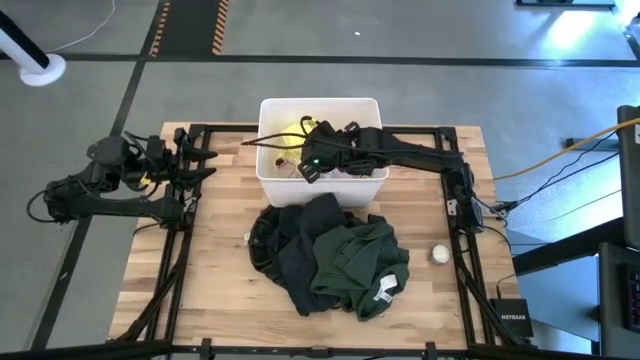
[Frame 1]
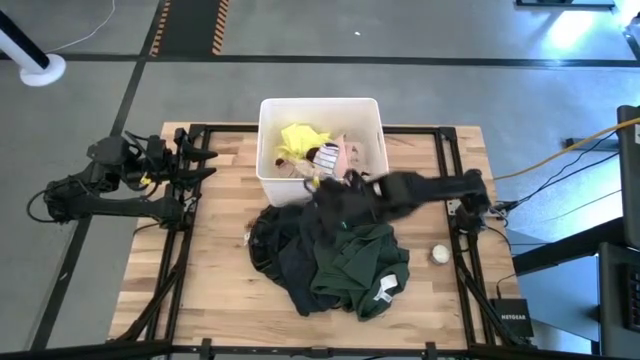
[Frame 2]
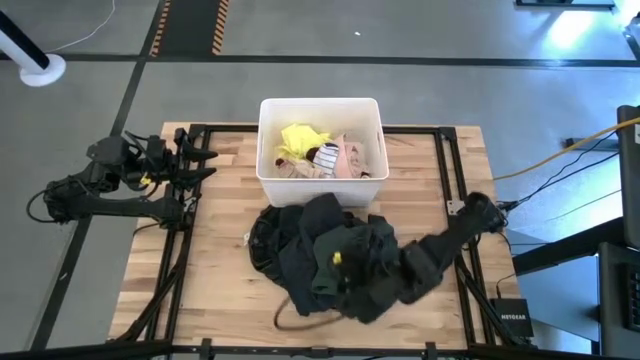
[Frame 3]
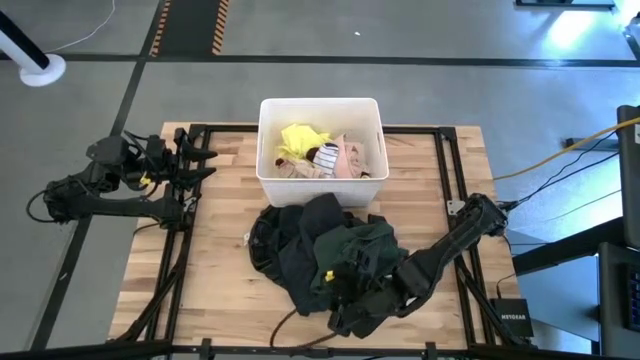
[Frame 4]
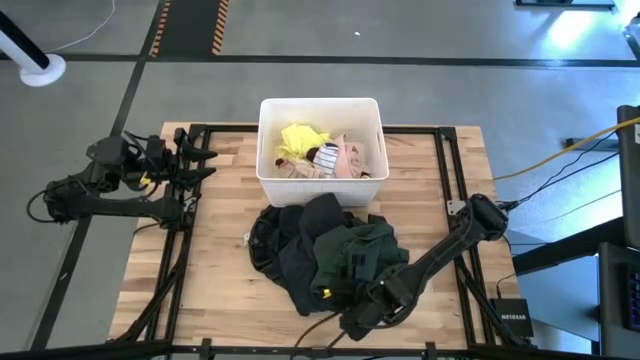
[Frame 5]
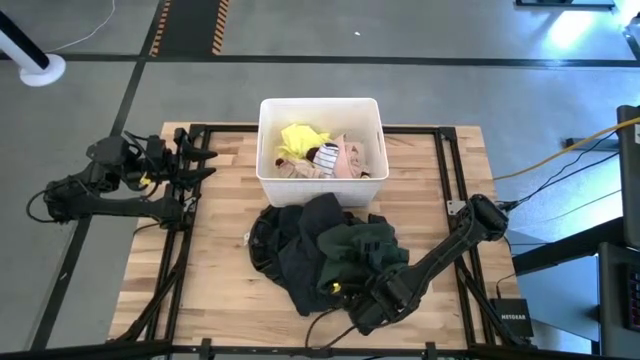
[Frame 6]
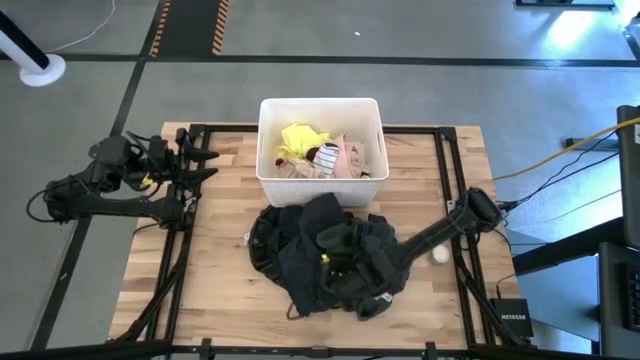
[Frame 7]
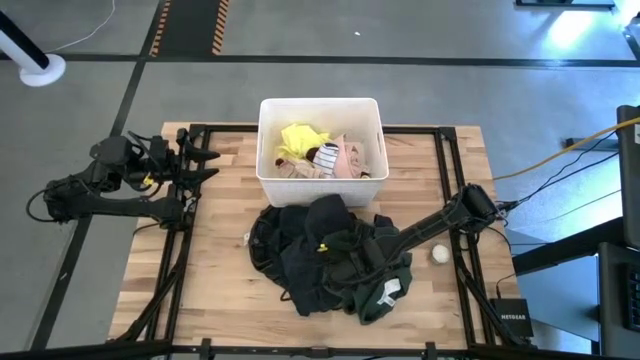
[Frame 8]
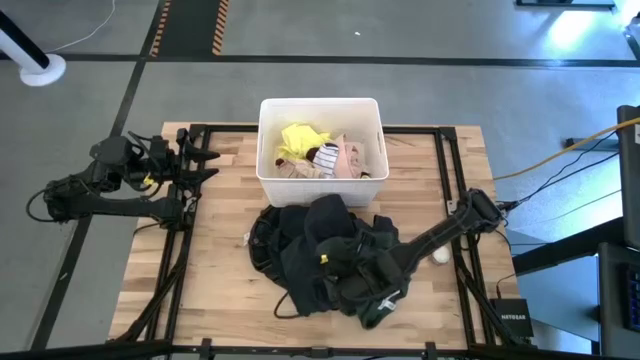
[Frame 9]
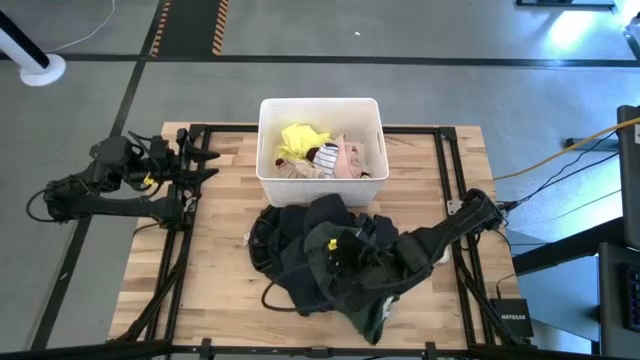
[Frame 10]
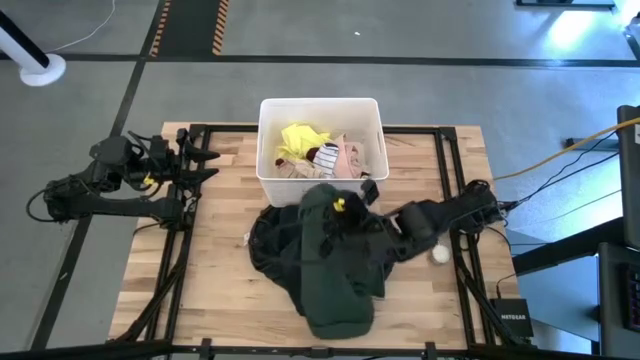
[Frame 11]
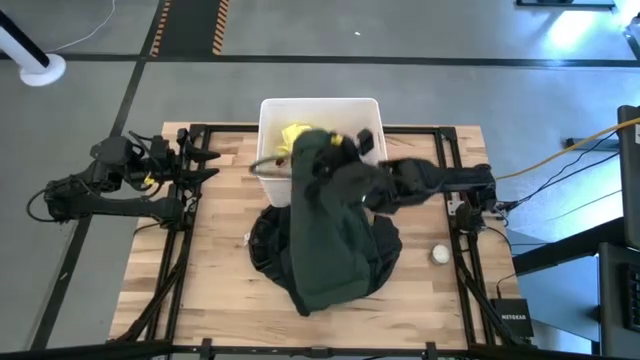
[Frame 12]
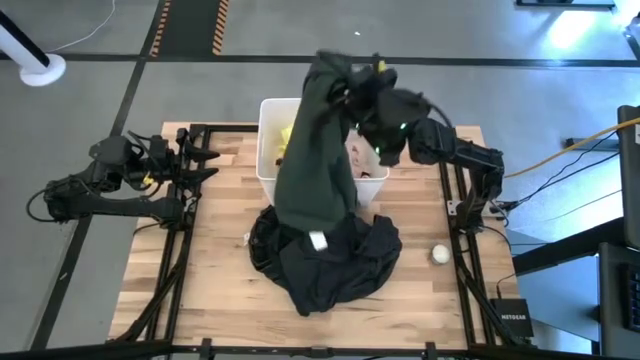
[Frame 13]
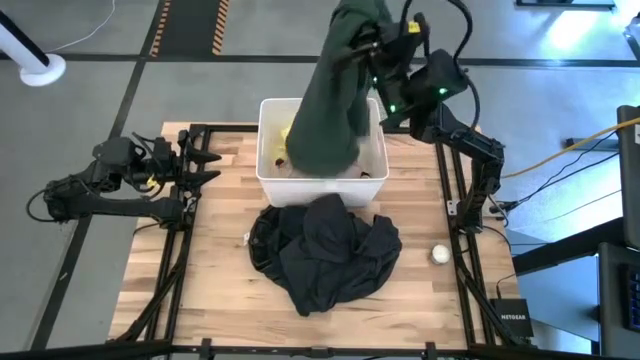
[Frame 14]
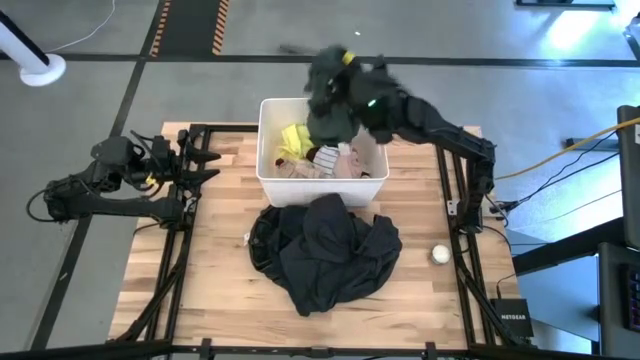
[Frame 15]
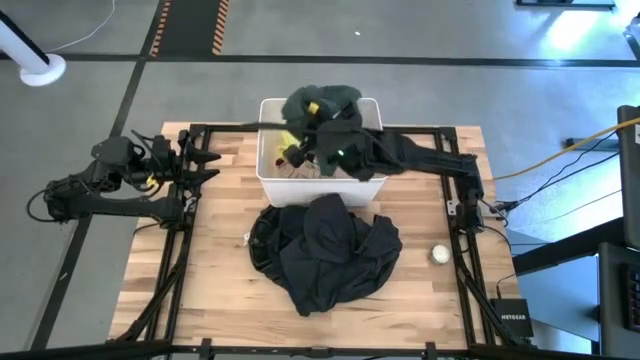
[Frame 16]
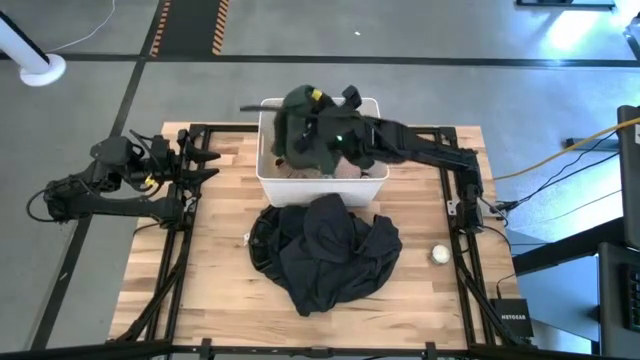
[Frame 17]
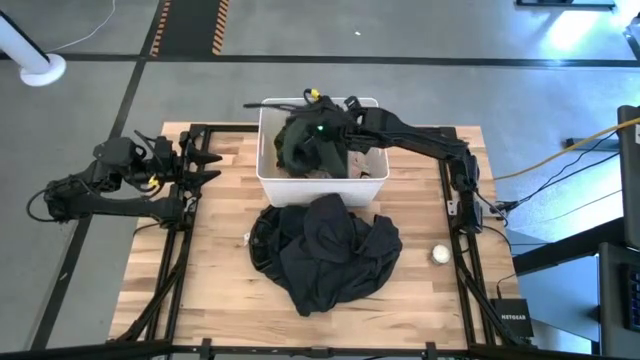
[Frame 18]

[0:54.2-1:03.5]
Task: Sort clothes
Put the dark green shirt into the white bin

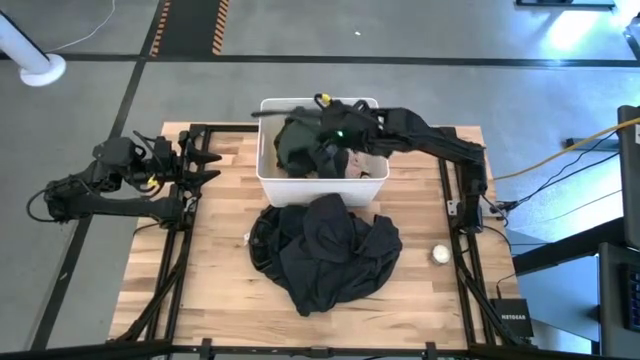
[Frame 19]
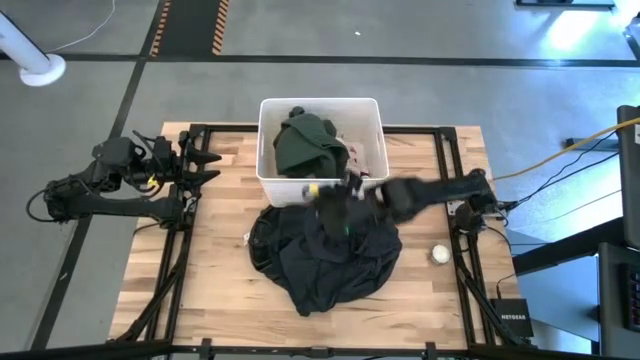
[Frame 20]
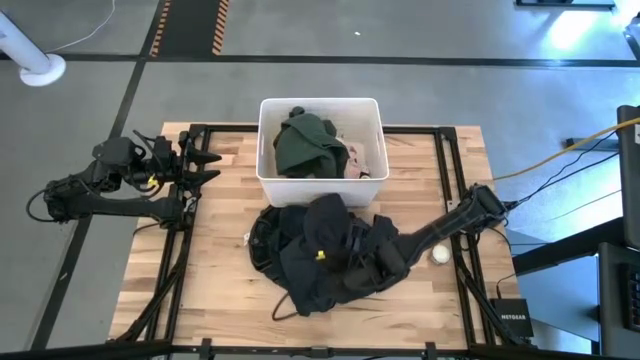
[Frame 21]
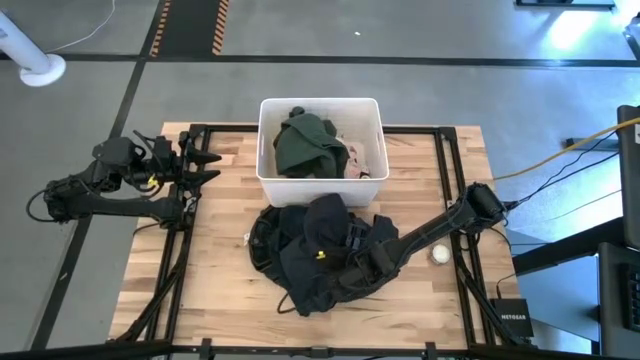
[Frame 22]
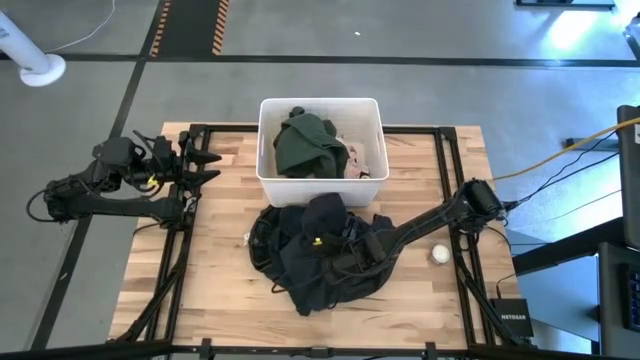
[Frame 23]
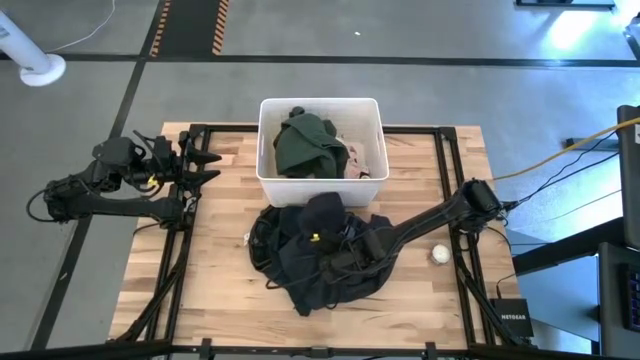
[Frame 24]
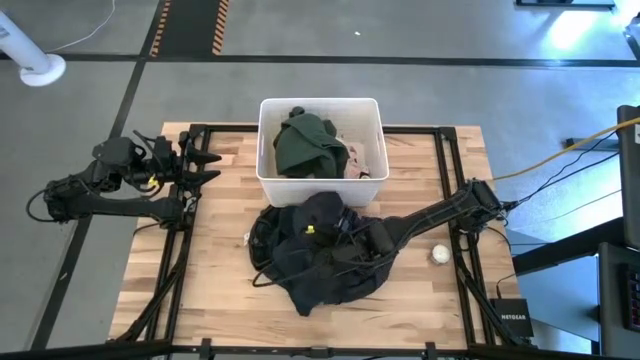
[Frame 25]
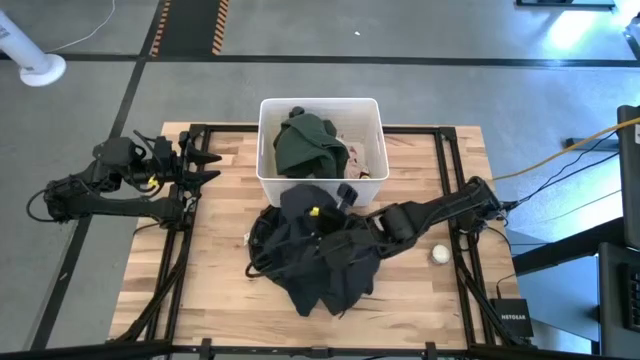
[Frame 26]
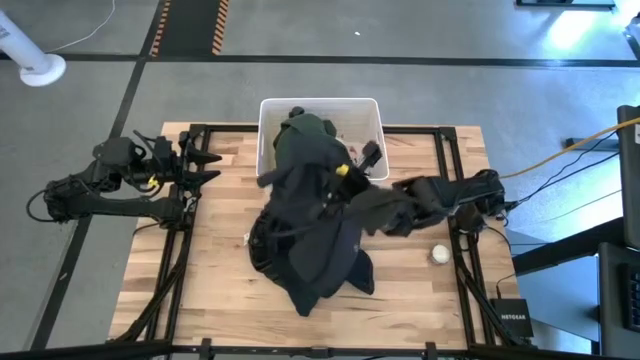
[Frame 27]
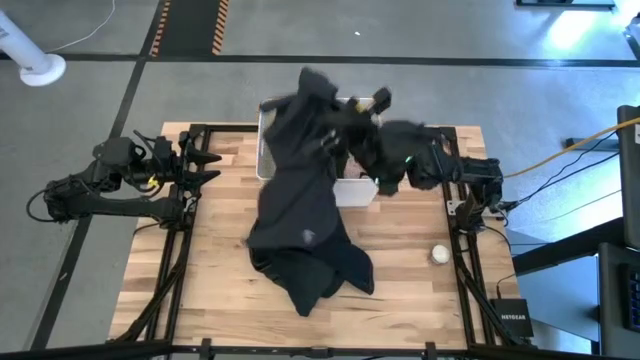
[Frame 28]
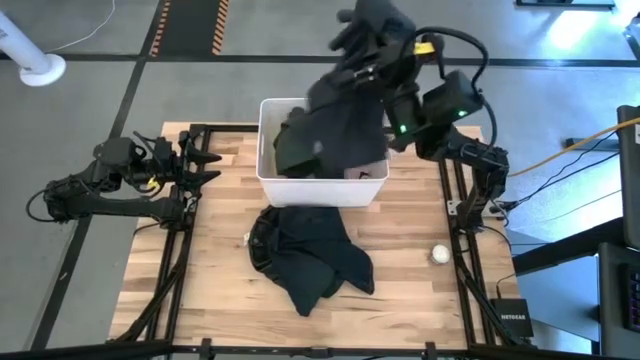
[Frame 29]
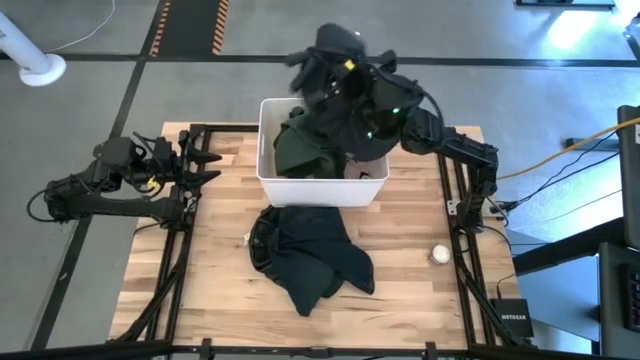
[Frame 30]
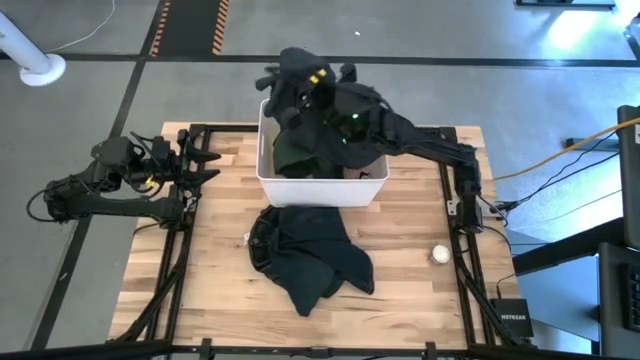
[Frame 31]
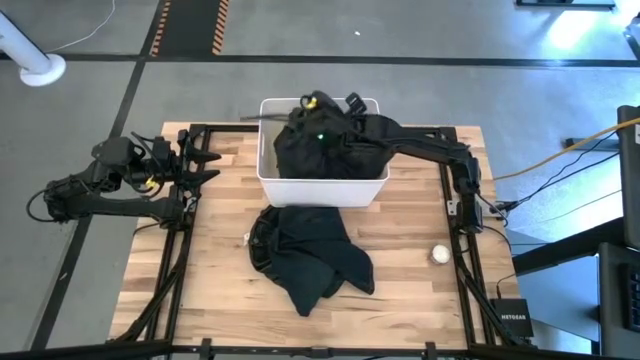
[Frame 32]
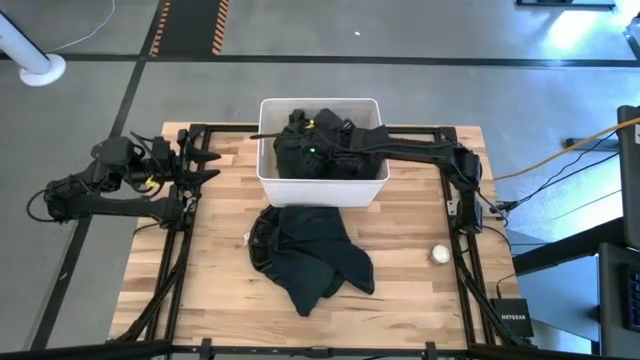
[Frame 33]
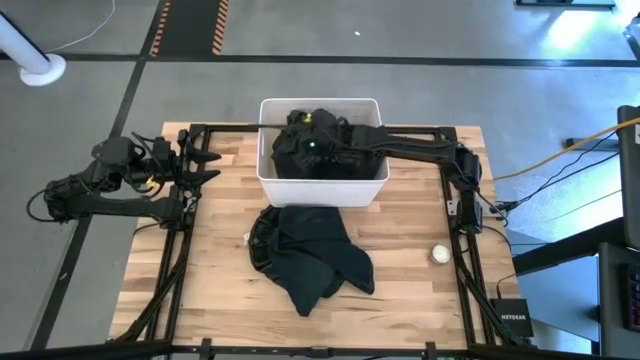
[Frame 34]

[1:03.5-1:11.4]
Put the black shorts into the white bin

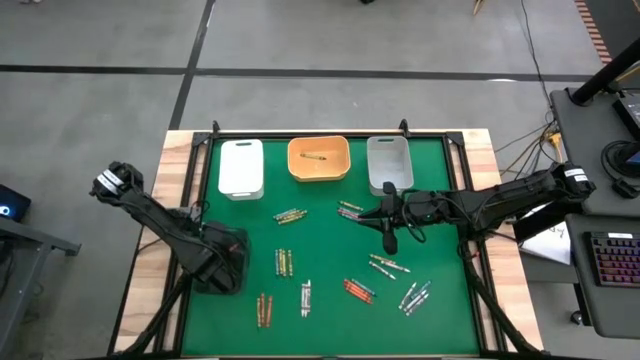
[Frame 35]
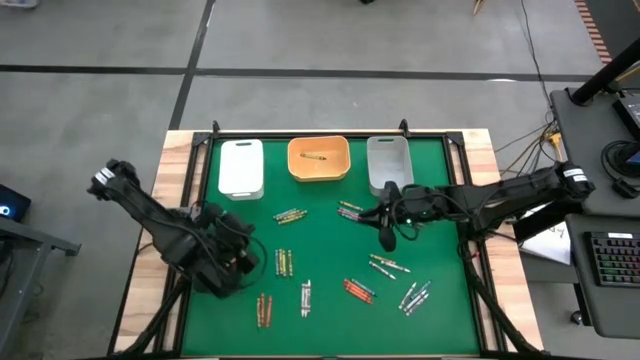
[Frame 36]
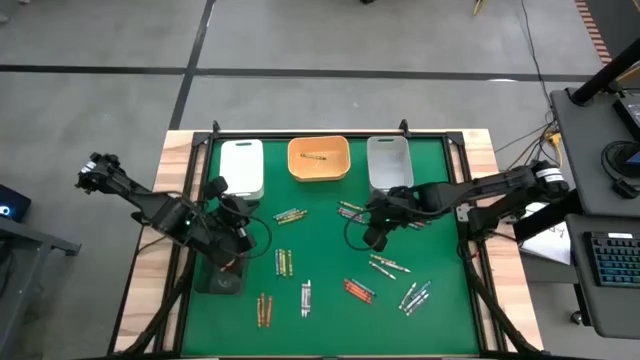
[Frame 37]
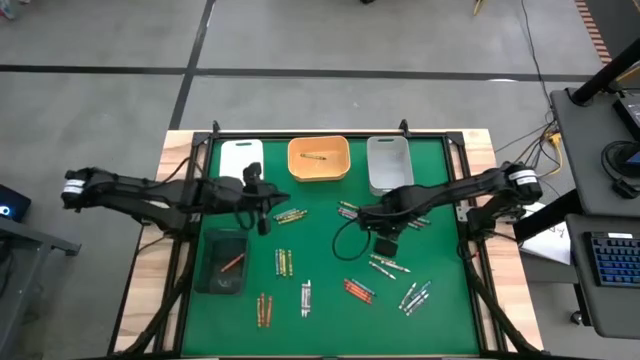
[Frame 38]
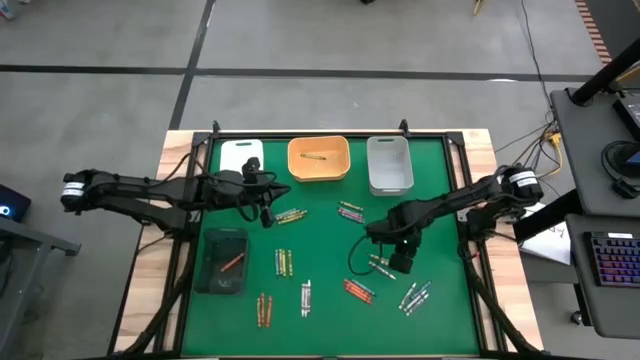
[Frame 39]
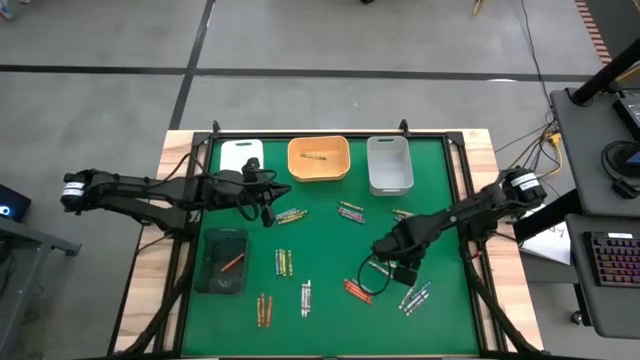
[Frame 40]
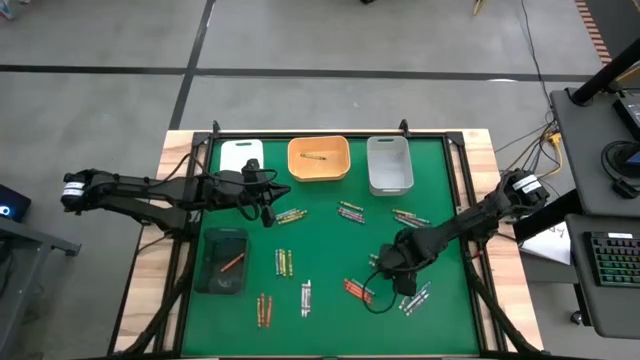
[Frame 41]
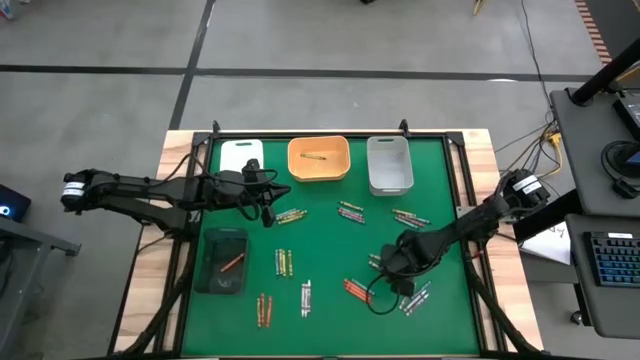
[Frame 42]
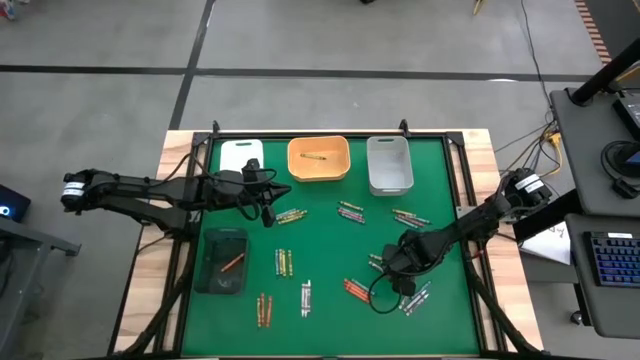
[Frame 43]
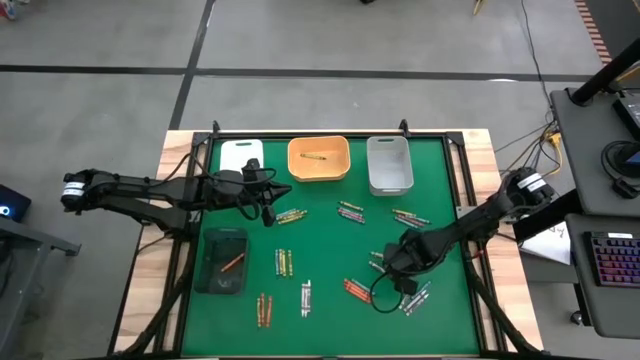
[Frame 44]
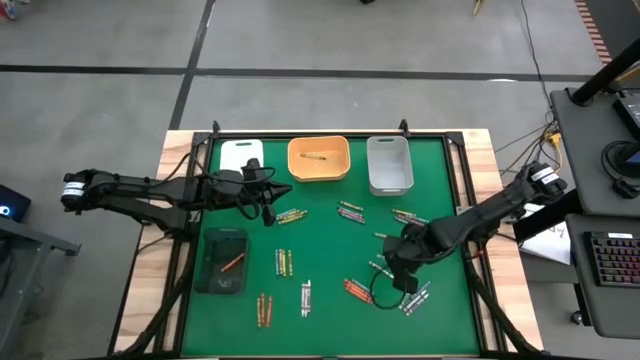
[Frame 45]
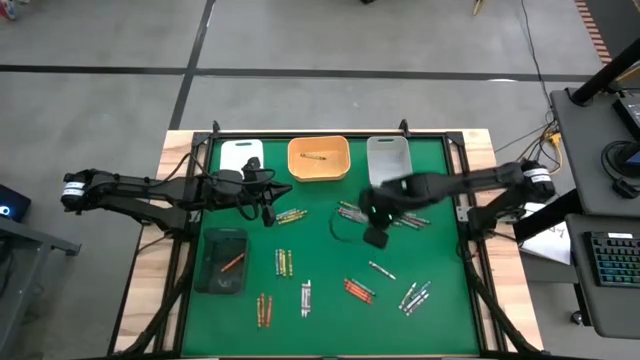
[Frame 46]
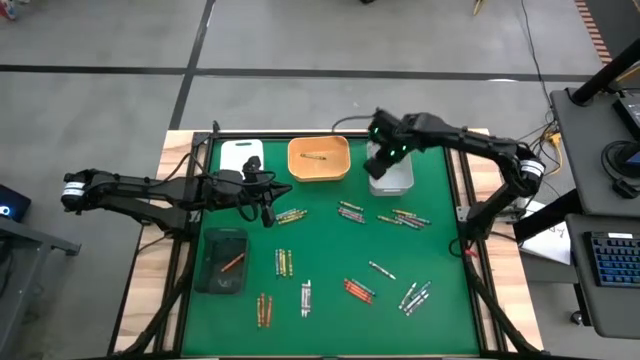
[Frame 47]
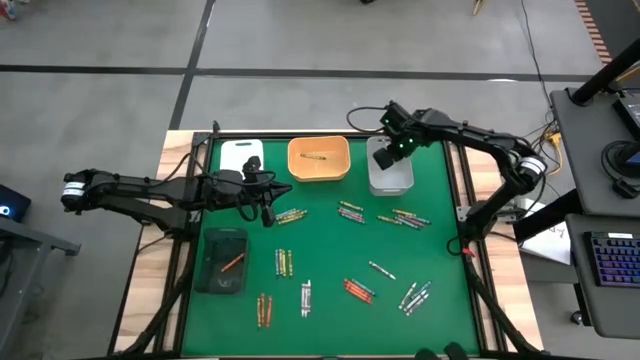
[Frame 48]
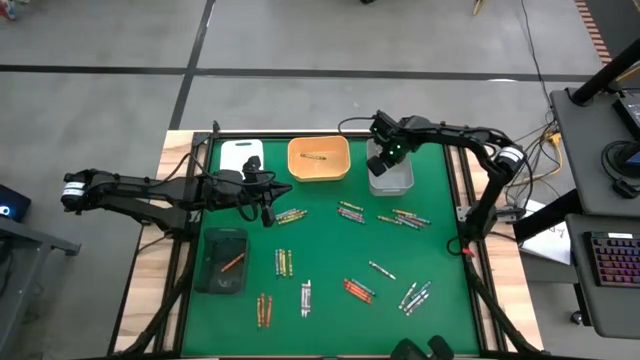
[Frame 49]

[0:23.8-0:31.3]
Task: Sort crayons
Put the white crayon into the gray bin
